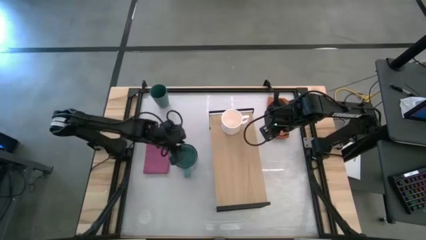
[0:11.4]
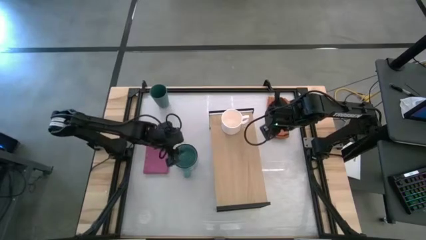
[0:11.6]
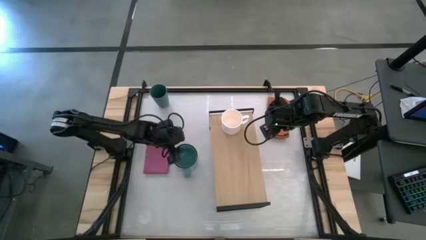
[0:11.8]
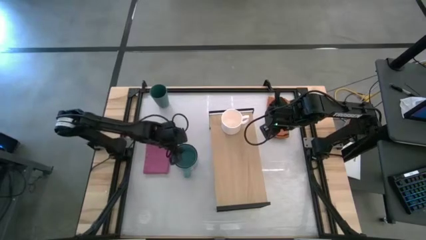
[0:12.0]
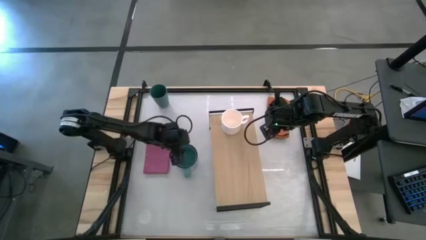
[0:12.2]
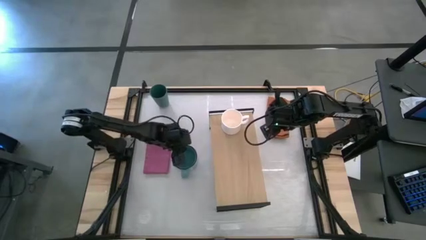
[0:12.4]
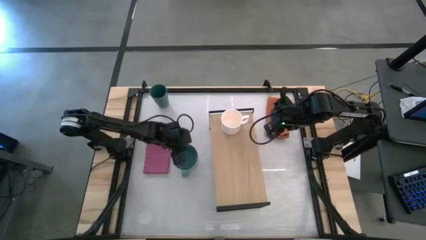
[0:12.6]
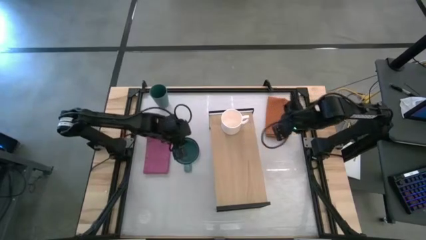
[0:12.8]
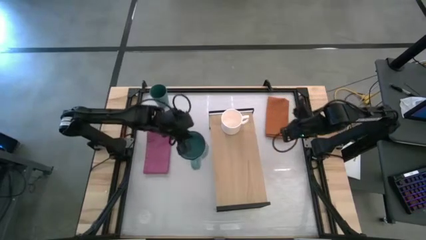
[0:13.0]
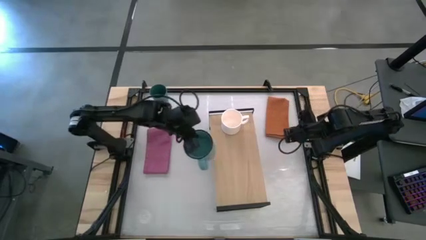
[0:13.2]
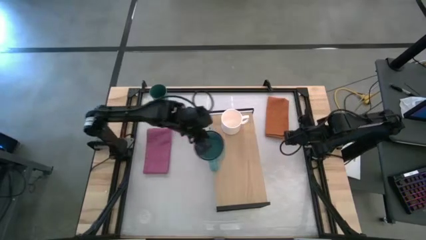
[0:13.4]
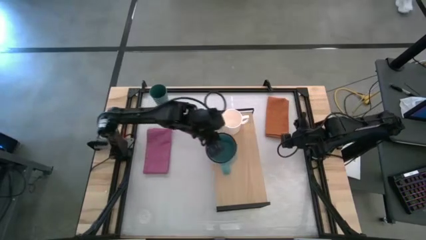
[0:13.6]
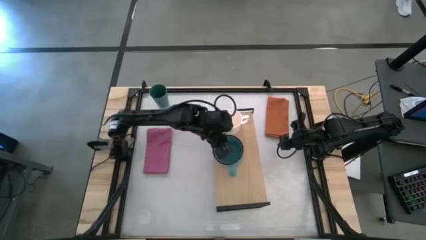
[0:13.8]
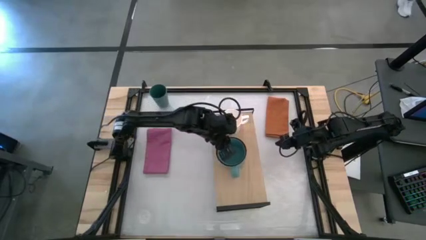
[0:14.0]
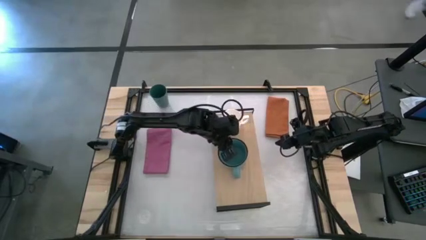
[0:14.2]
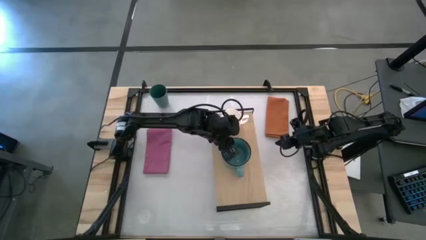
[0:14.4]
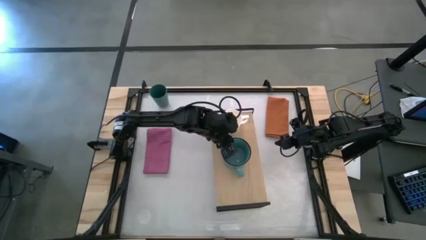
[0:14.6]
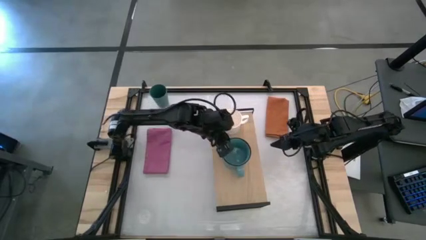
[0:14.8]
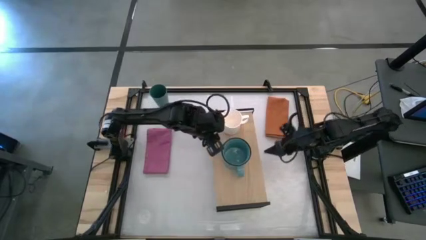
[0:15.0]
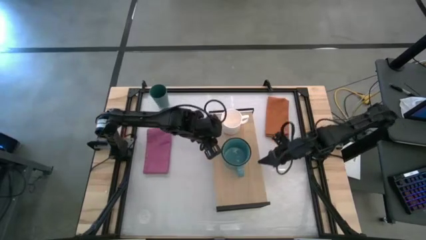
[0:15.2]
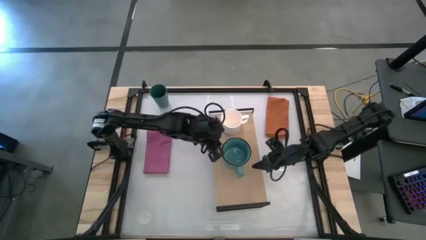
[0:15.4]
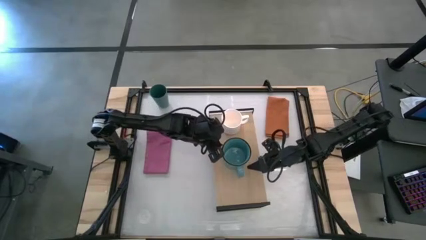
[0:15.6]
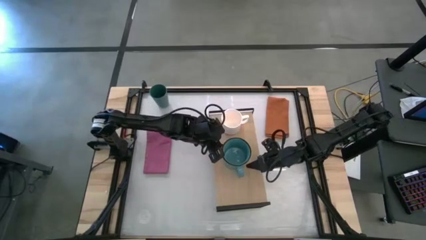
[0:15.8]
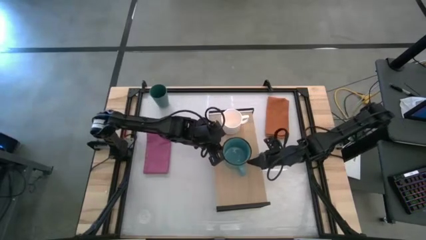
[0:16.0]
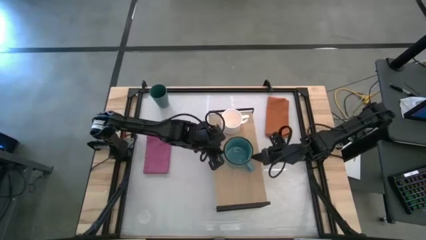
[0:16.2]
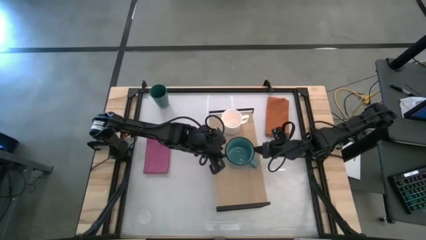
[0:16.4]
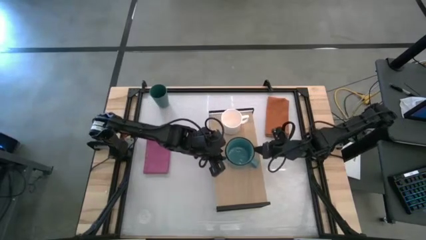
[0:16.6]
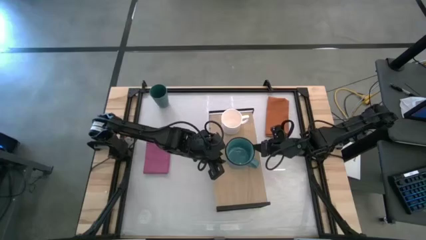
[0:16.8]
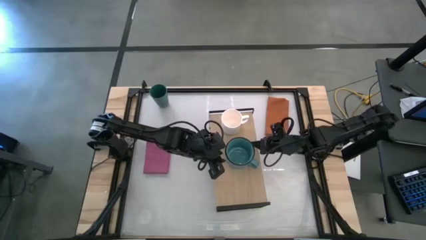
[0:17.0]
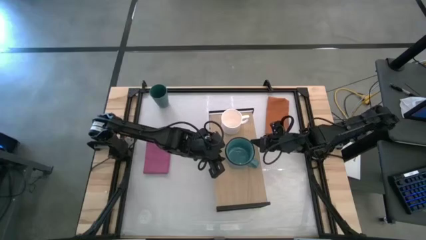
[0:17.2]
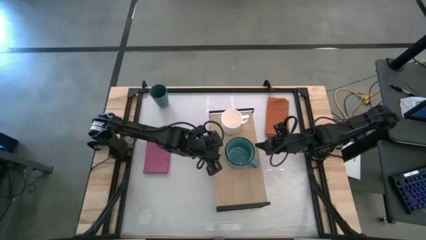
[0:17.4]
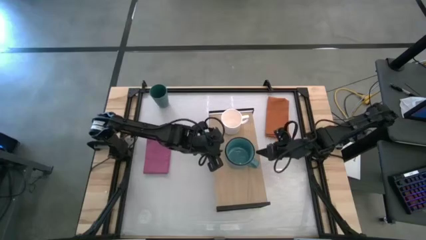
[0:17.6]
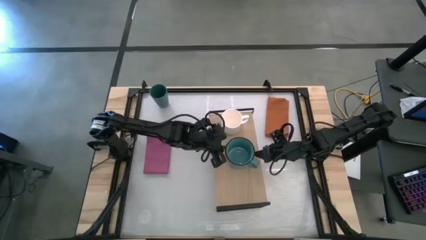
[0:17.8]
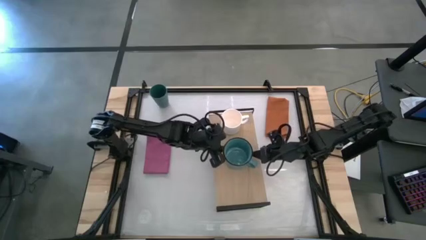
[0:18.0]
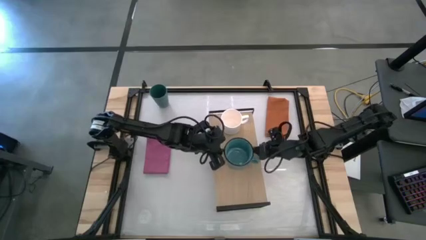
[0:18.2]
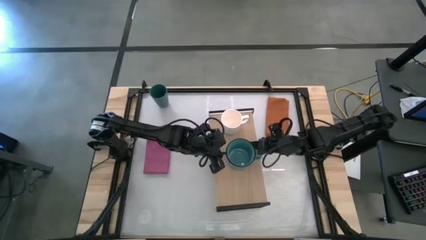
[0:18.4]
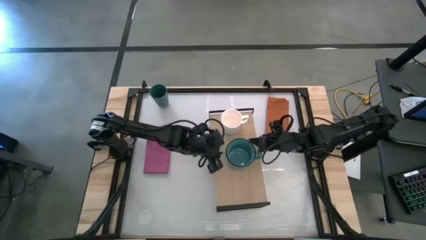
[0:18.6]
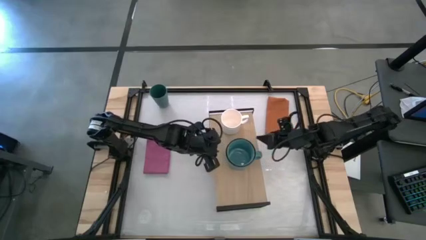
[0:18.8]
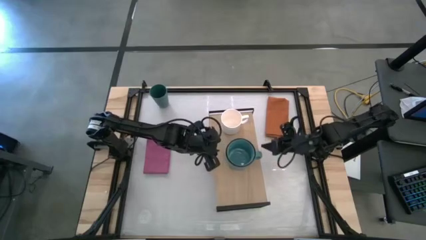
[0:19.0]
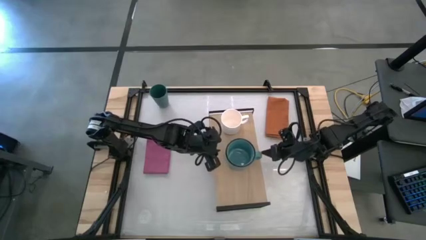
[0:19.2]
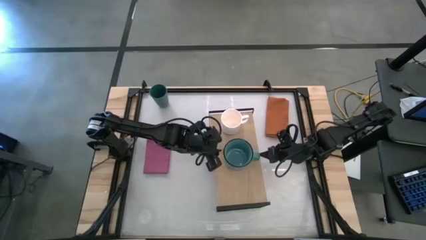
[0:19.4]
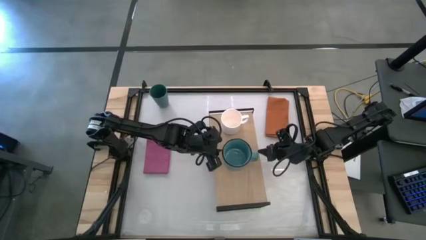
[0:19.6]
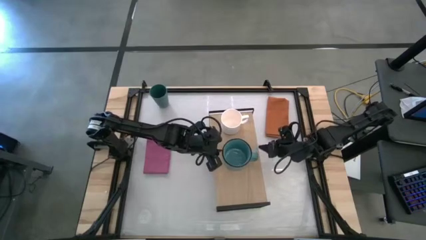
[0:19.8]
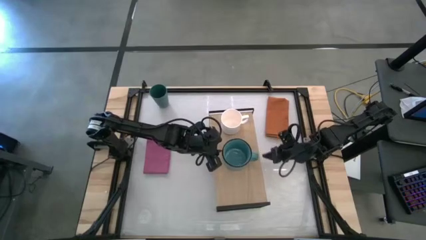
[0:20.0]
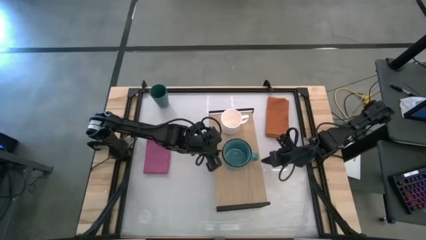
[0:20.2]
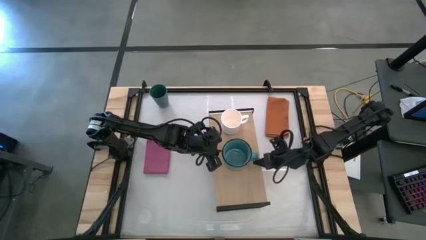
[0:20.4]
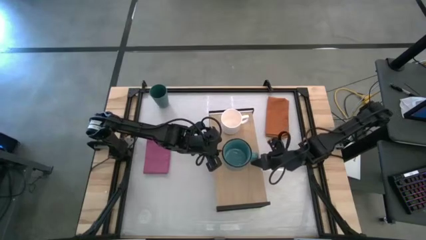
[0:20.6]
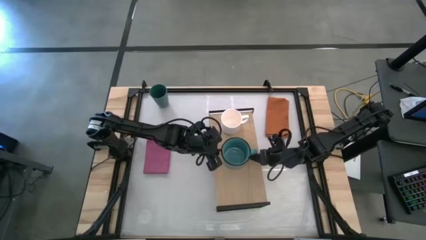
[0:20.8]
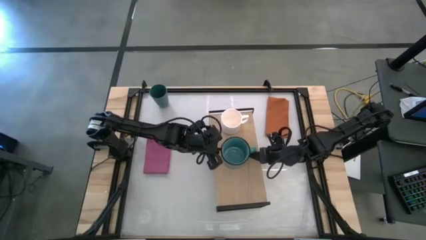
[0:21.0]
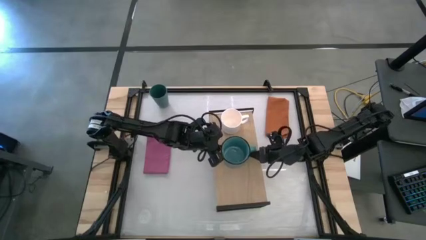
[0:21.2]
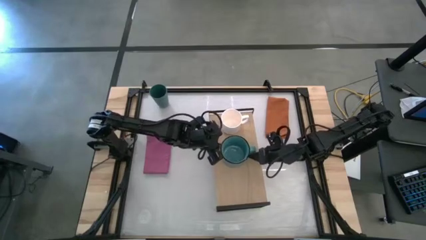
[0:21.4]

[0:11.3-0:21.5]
Task: Stack small to large cups/mugs on shelf
Put the blue mug on the shelf

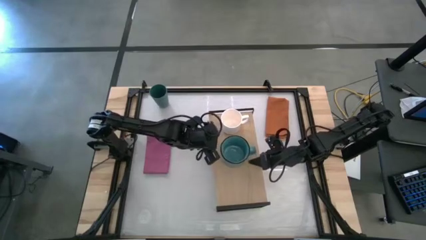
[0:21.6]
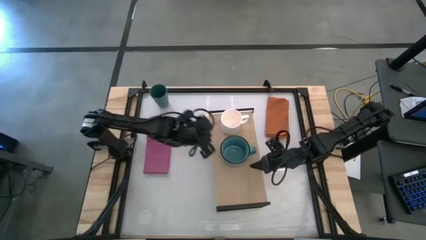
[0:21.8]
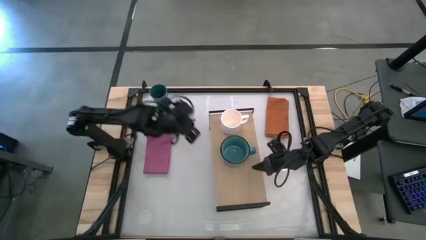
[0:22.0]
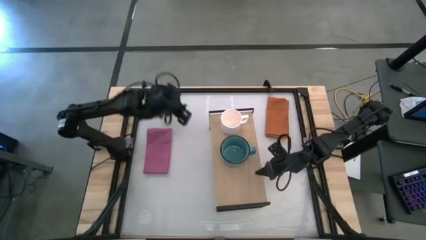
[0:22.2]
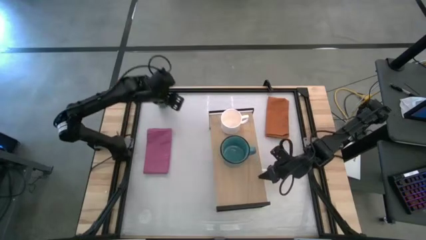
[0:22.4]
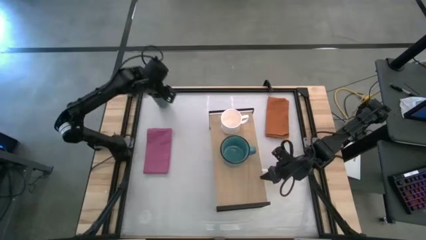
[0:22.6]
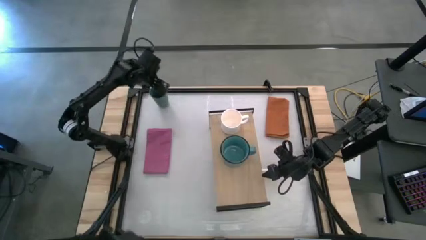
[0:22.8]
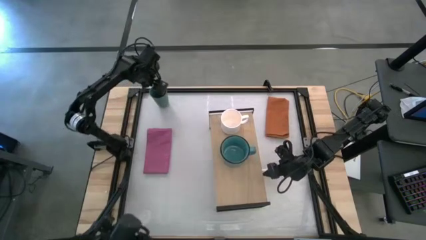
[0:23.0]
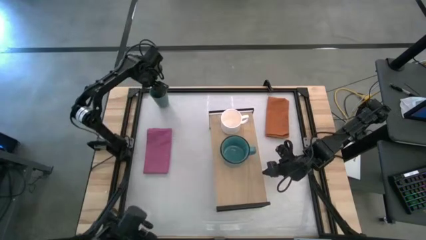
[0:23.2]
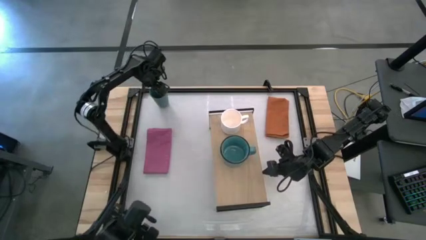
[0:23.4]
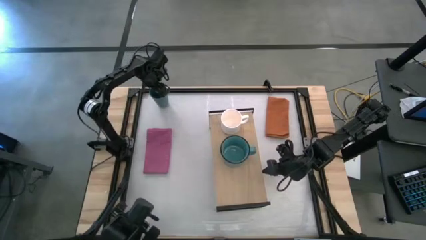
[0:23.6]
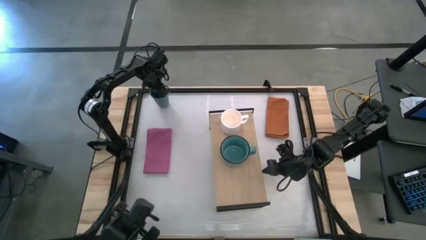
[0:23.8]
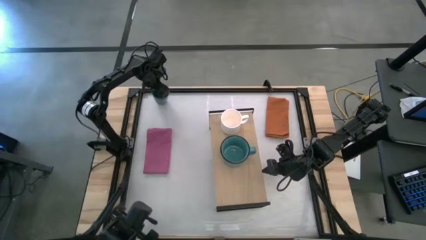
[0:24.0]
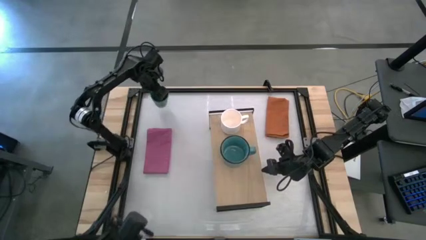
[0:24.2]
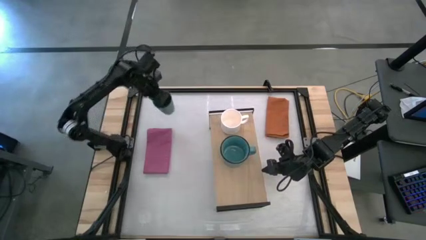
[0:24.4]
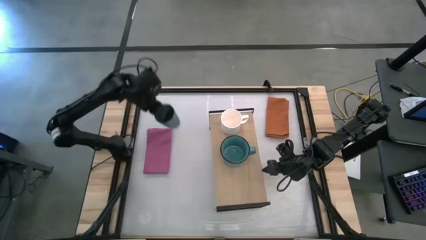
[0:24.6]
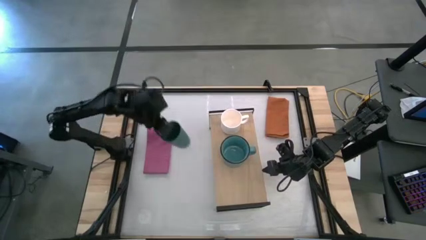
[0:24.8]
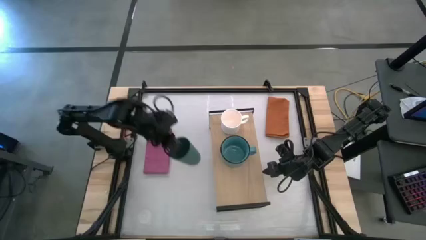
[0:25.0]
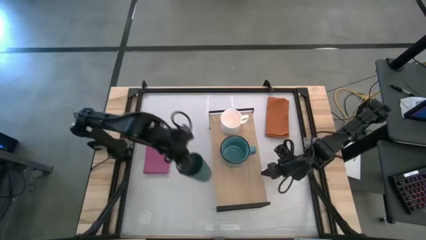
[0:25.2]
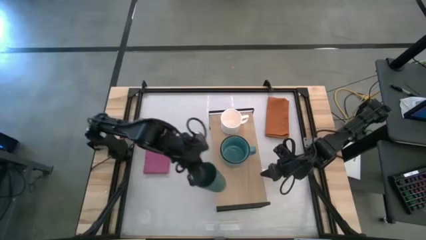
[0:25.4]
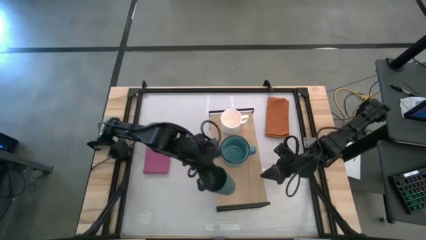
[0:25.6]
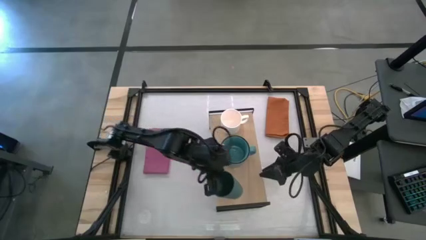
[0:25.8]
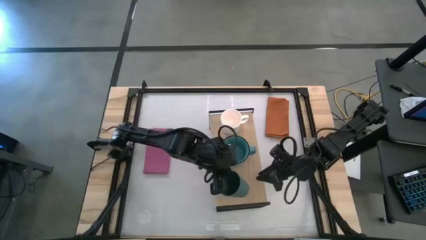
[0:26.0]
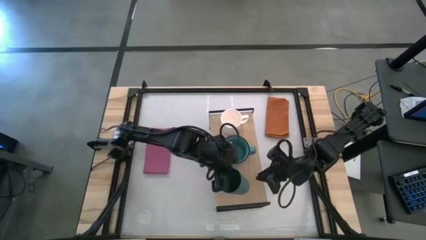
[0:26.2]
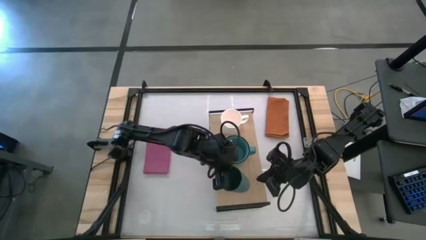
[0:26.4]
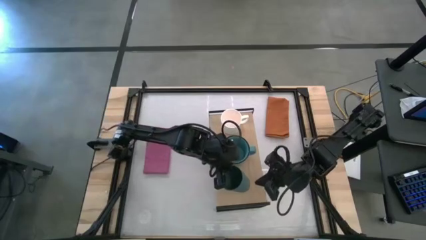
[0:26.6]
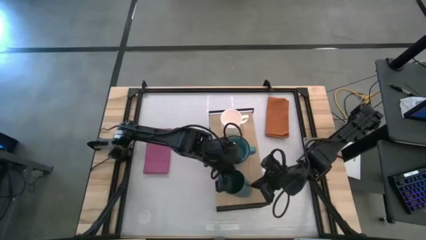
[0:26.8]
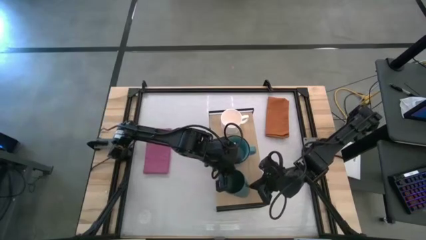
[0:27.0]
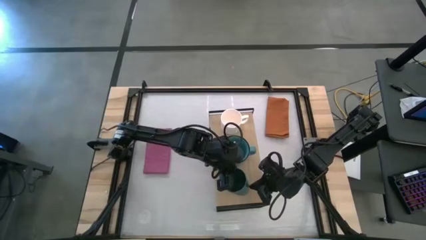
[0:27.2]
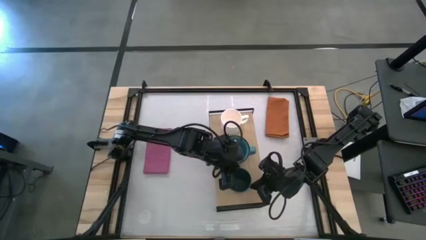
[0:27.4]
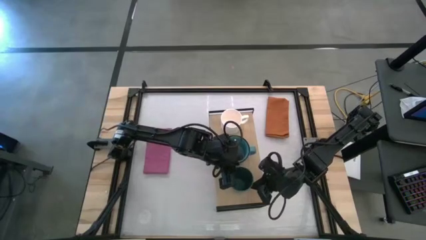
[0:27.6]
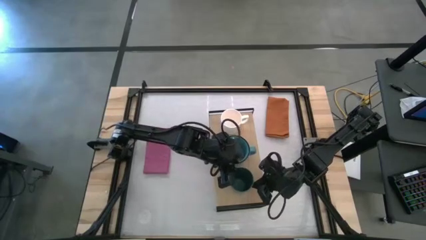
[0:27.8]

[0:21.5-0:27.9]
Put the blue cup on the shelf
